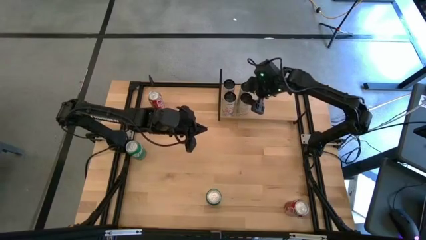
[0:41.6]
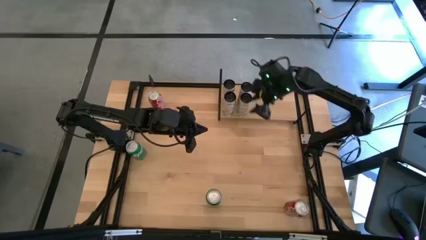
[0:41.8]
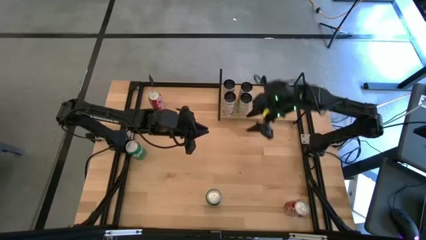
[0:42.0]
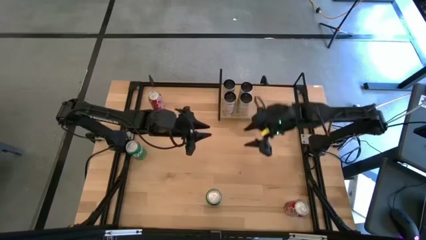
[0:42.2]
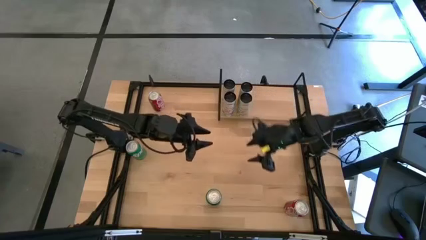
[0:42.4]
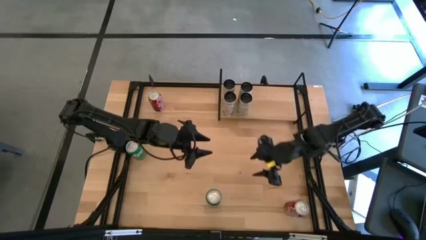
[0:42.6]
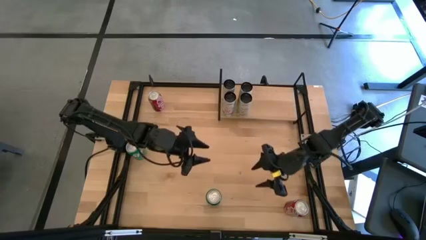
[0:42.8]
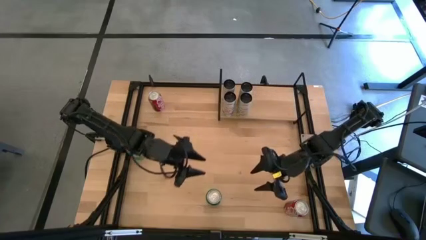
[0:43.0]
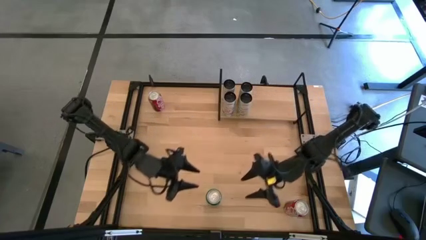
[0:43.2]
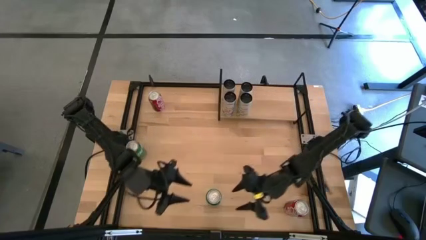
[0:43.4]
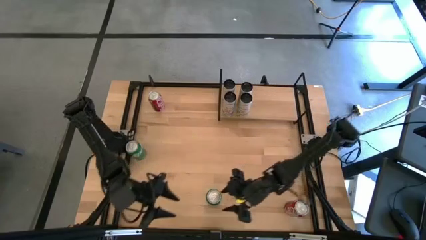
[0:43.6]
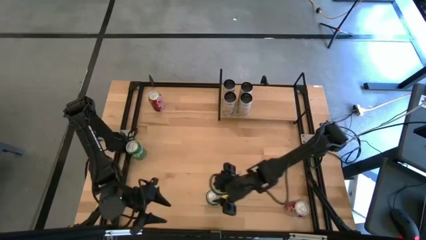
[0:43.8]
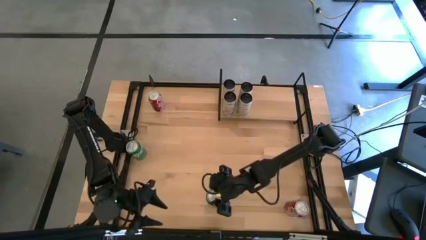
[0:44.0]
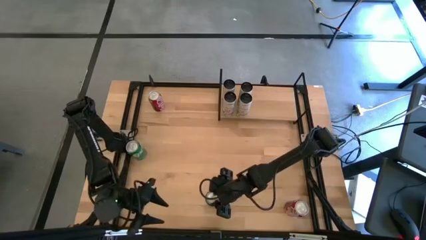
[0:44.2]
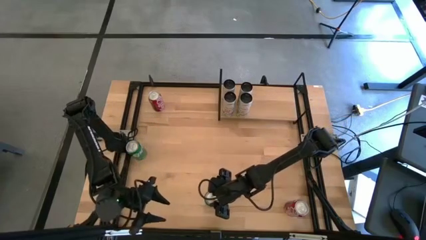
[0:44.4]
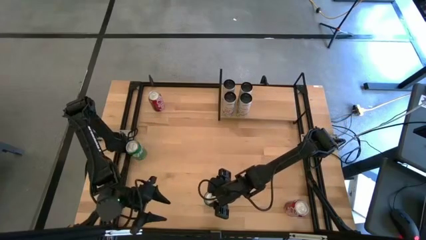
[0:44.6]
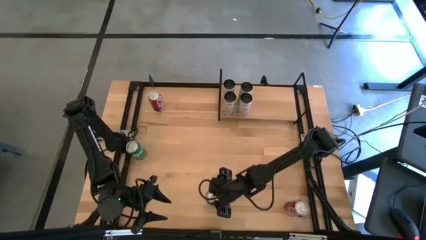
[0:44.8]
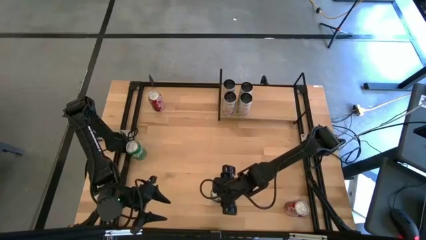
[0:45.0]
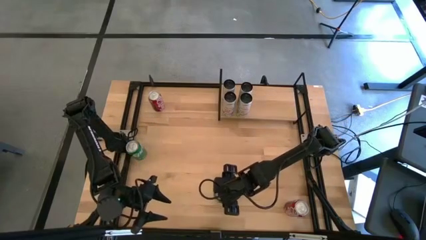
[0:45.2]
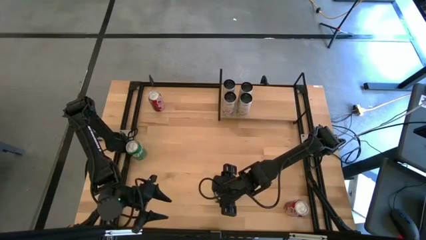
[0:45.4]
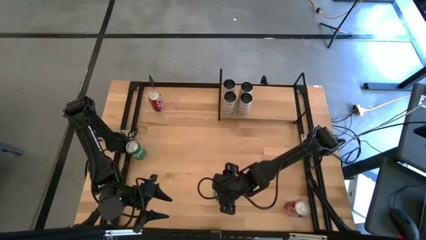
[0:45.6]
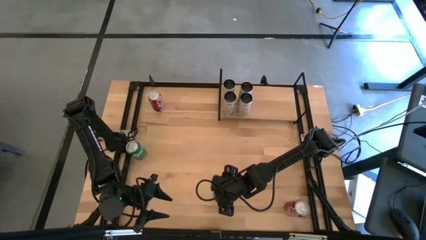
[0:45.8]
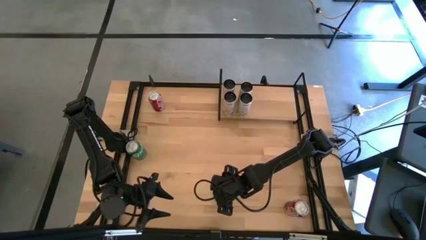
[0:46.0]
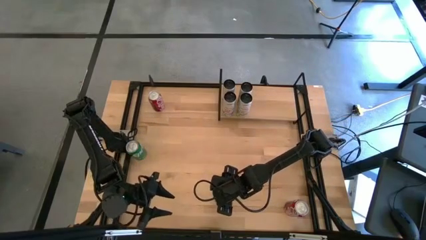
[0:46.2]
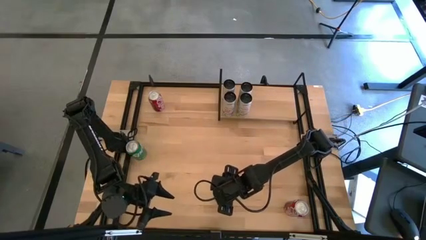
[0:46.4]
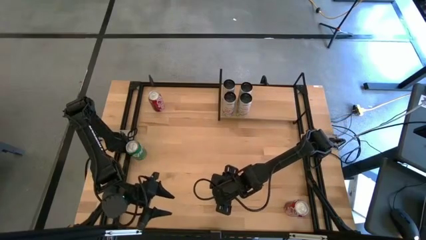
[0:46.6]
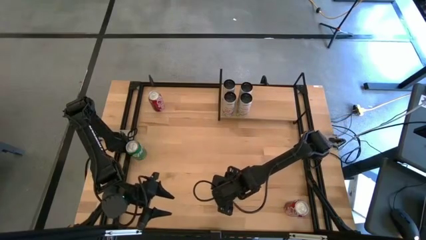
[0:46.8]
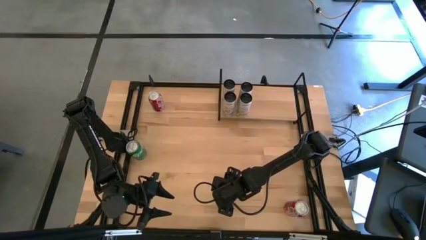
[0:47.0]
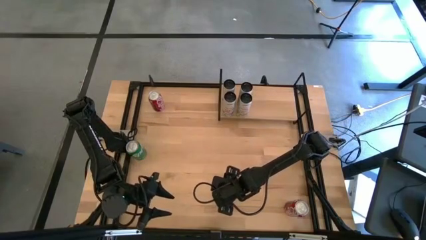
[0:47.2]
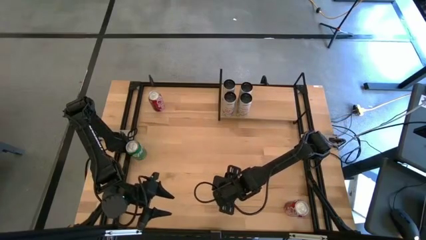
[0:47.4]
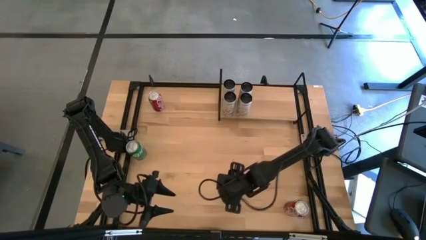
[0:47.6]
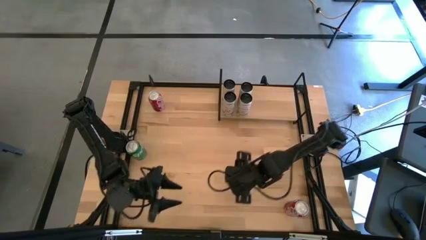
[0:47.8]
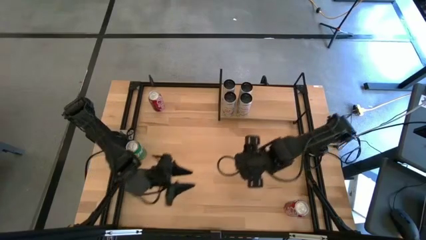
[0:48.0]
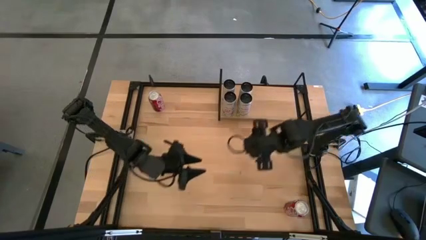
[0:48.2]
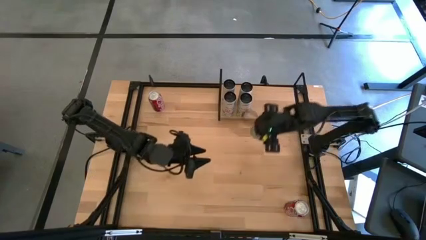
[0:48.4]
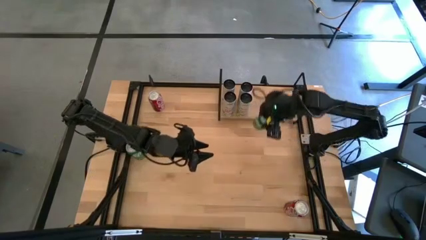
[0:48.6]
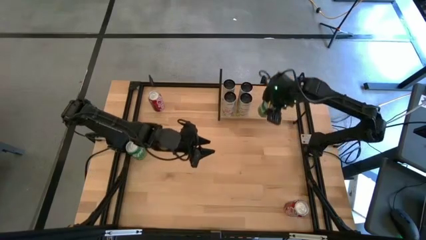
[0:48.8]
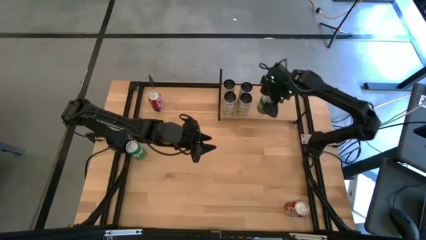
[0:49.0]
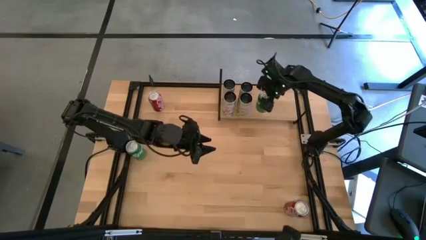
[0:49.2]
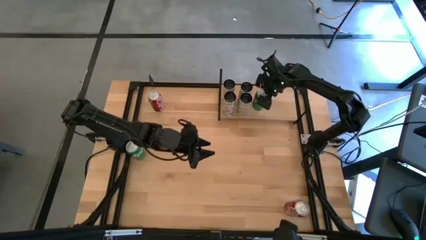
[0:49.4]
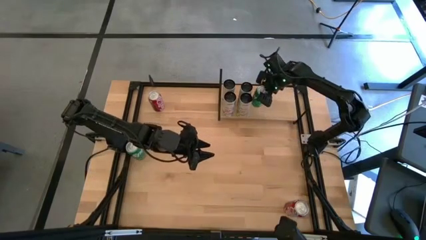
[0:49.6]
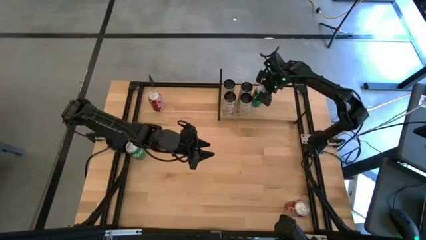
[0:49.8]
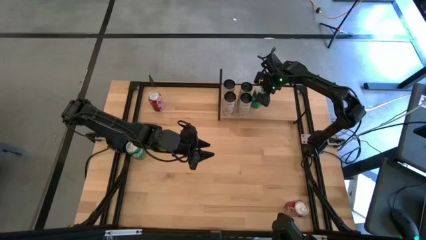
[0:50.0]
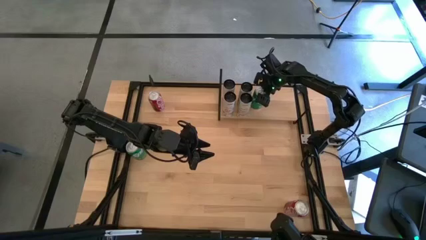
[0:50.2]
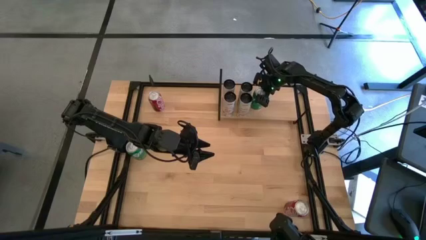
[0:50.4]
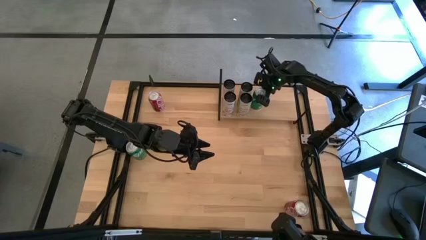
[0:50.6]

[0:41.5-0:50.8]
Task: Place canned beverage on shelf
Put the bottom green soda can on the shelf

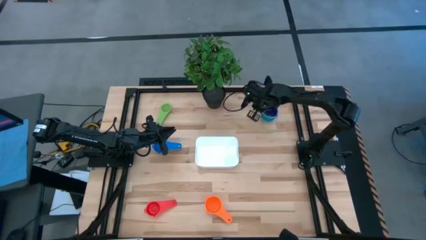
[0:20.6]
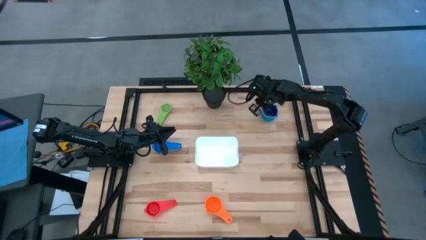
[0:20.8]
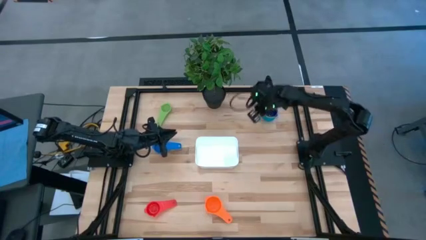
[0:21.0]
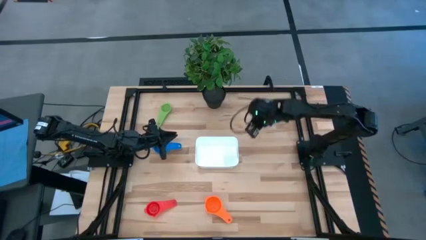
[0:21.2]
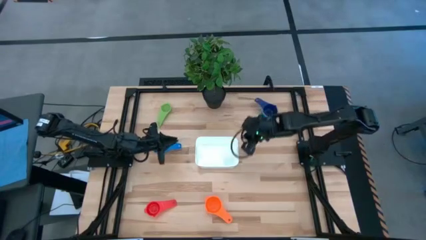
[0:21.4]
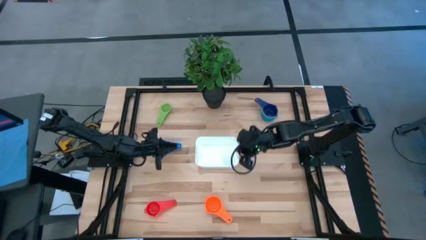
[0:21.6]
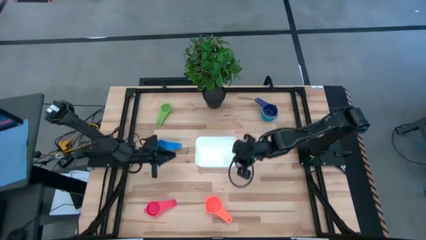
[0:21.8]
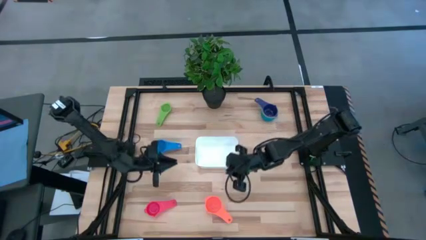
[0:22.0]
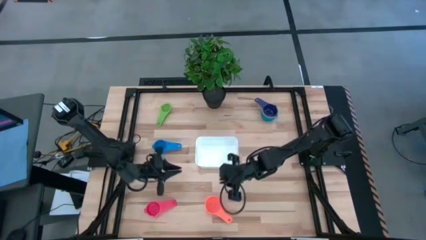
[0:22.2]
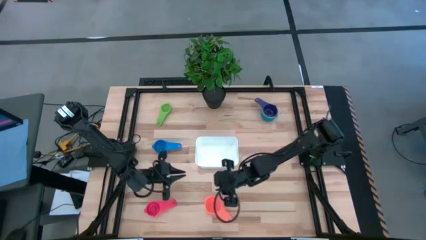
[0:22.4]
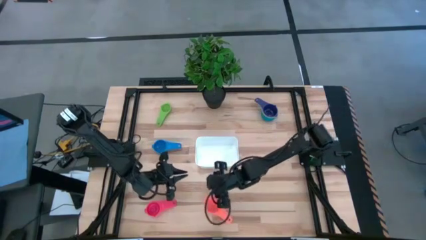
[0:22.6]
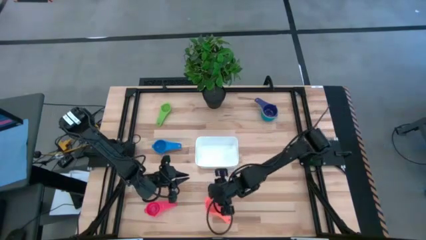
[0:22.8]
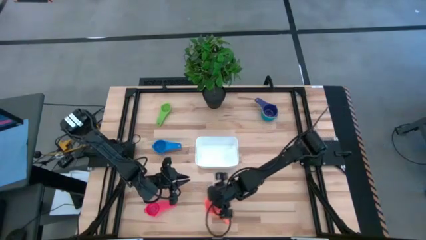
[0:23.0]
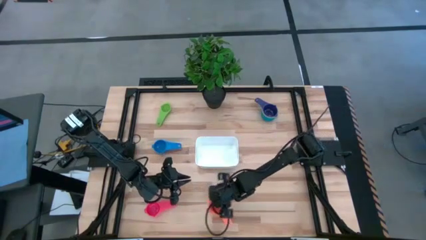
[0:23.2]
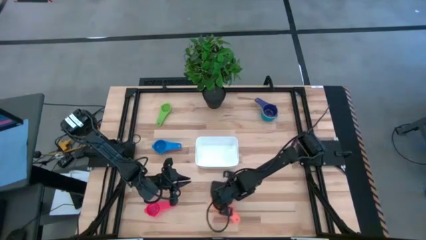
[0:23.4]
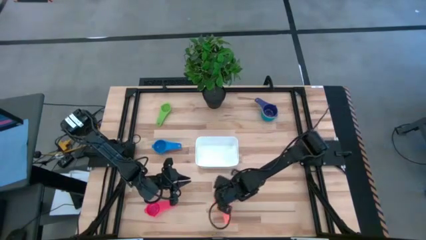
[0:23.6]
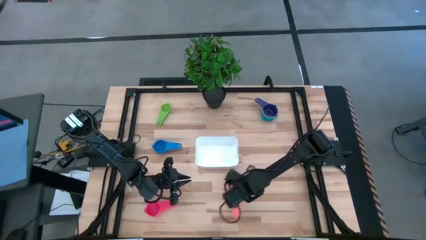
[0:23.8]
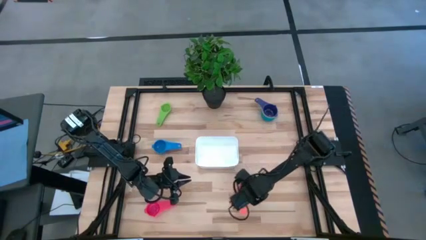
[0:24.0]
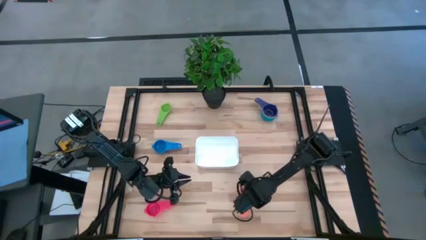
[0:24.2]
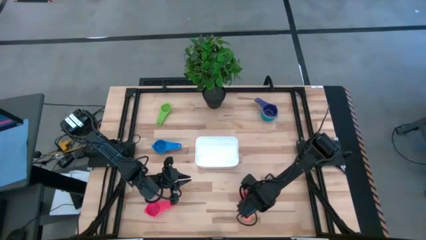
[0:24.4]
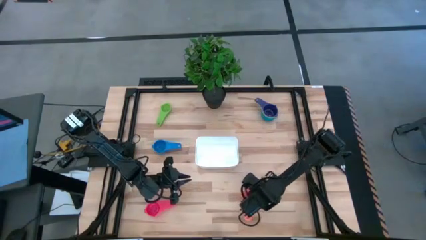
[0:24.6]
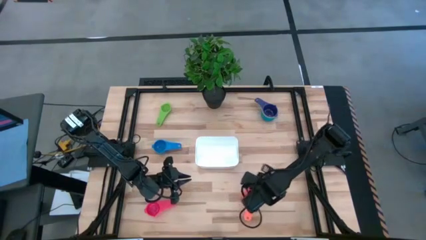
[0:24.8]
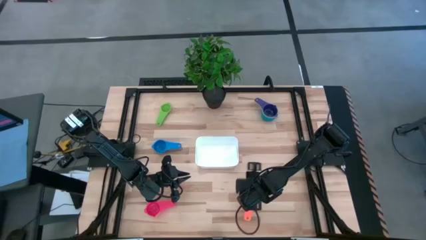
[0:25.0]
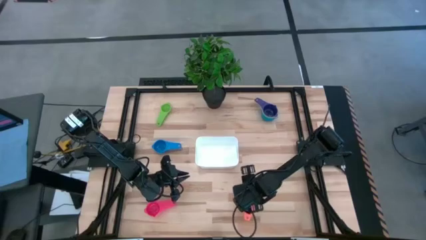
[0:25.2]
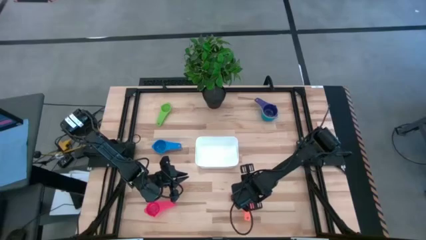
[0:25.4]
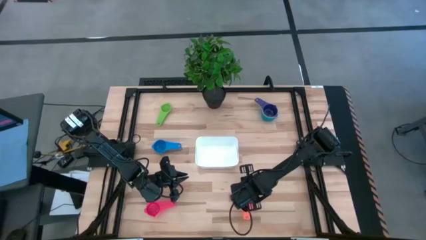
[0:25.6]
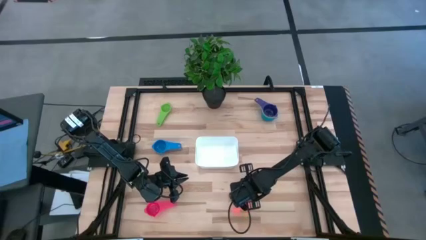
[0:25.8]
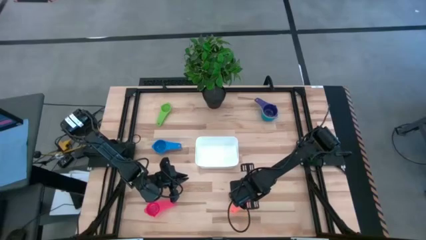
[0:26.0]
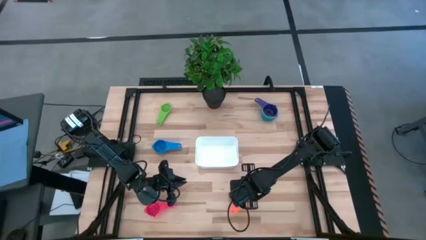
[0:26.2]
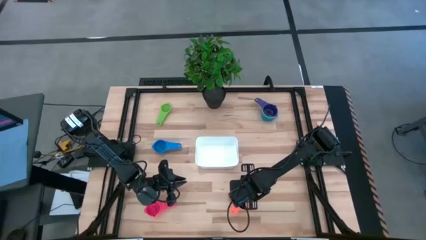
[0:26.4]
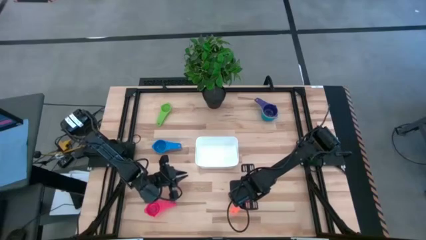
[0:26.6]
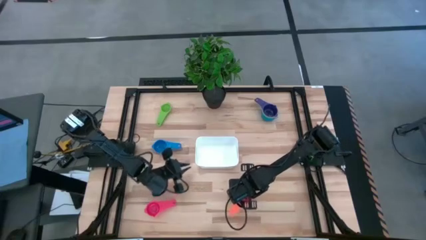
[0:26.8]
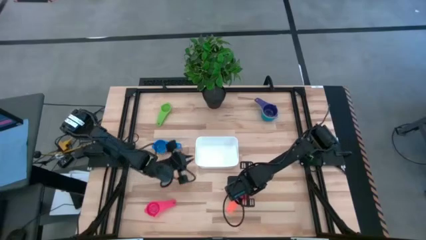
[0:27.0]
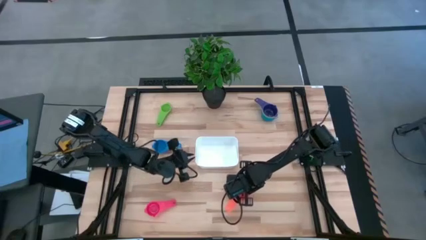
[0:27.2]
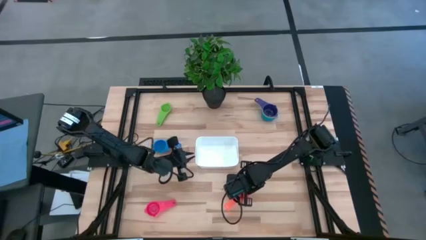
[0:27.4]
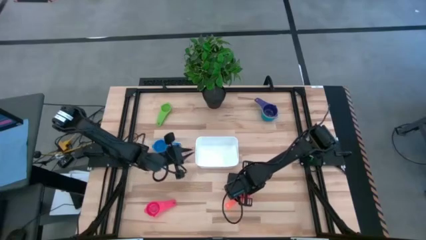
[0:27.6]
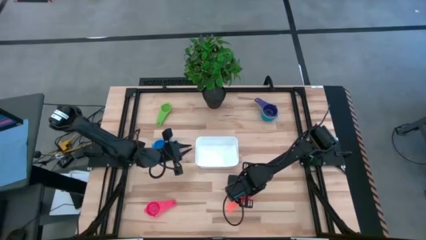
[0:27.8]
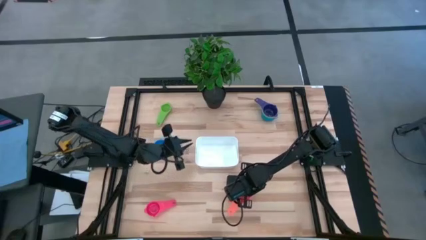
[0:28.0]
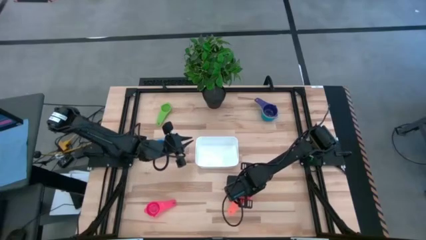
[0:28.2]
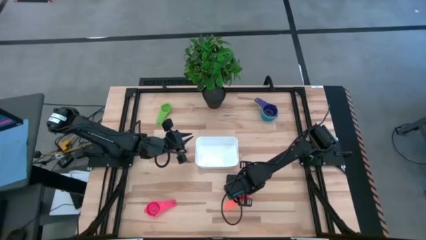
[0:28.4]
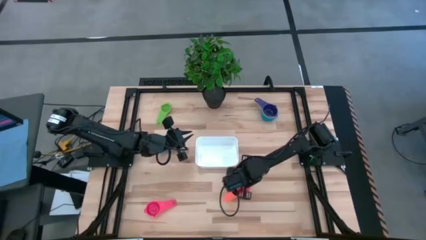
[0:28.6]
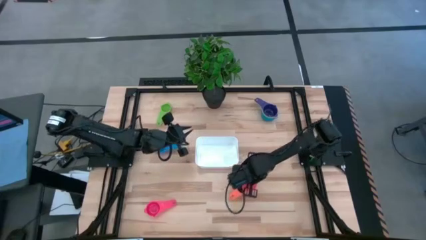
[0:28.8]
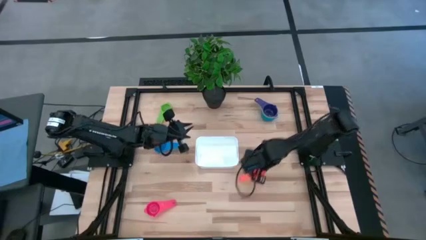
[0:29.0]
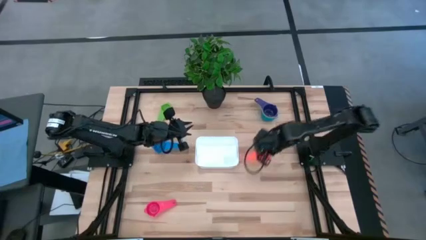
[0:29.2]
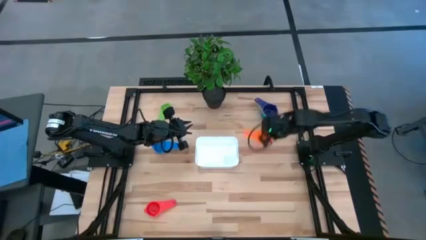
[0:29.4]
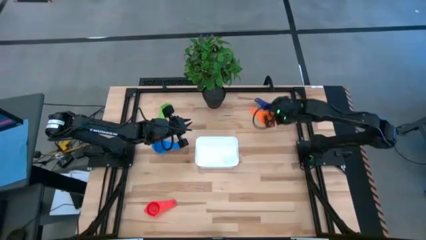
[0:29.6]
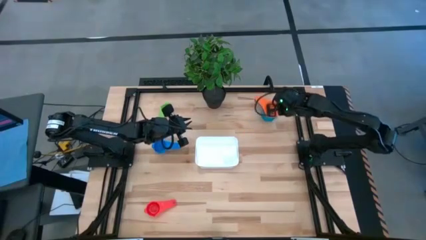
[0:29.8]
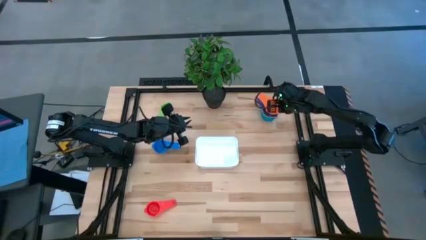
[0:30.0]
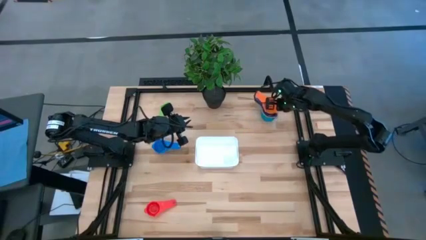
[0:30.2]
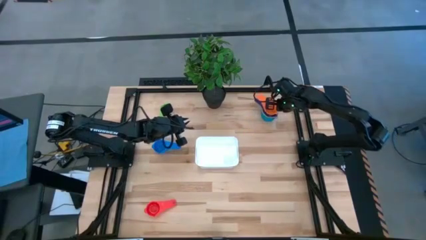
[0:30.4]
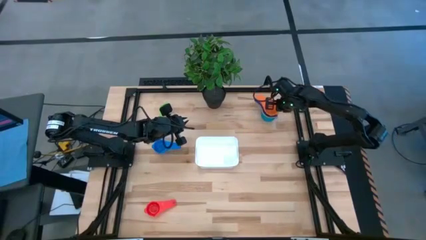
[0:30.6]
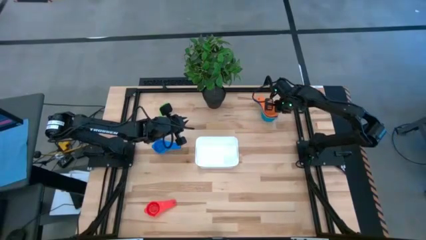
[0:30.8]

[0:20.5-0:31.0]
Task: Nest measuring cups in basket
Stack the orange measuring cup on top of the dark blue measuring cup
